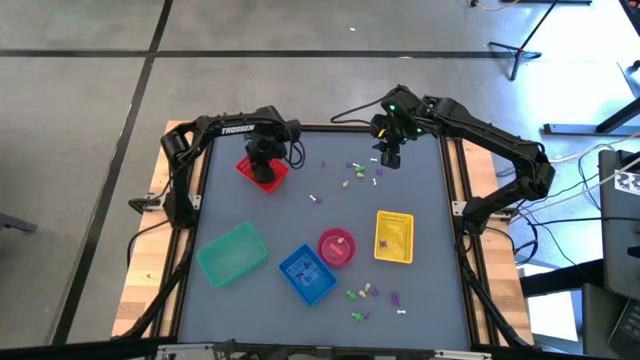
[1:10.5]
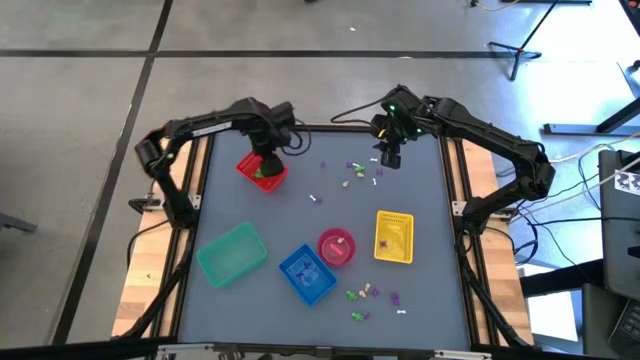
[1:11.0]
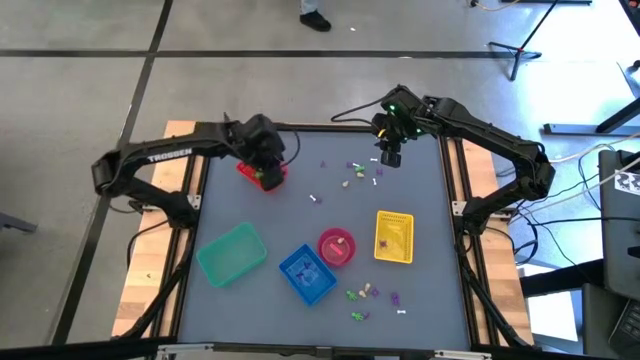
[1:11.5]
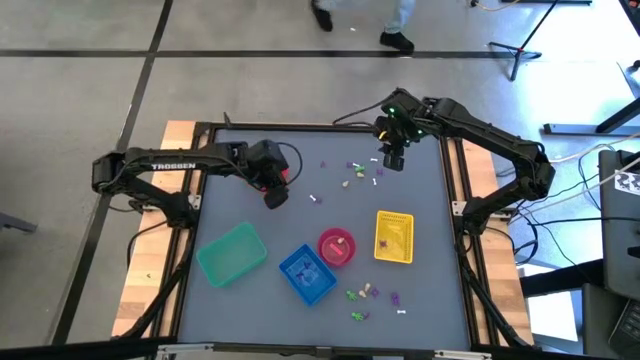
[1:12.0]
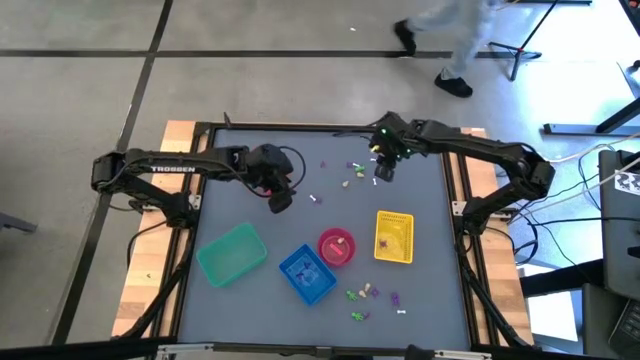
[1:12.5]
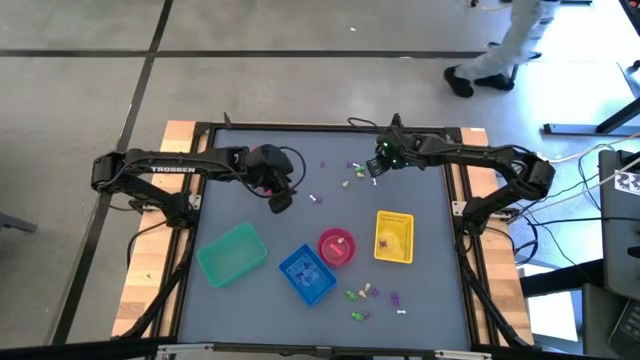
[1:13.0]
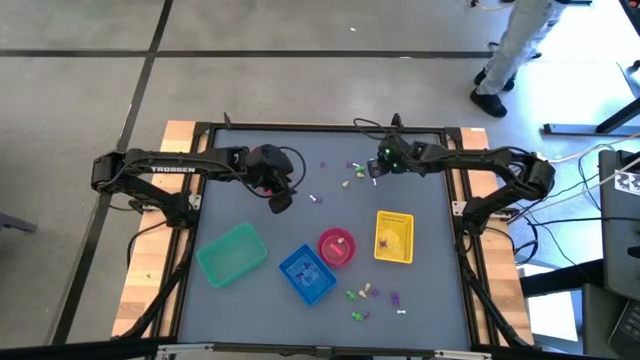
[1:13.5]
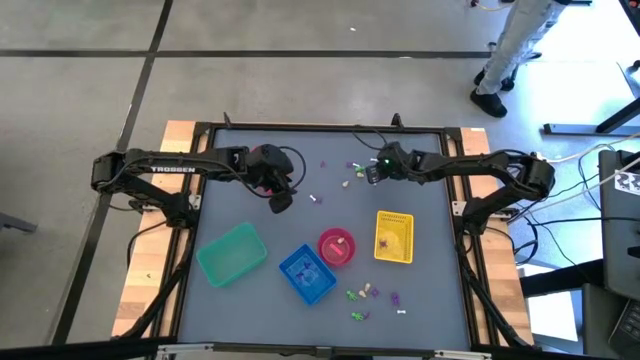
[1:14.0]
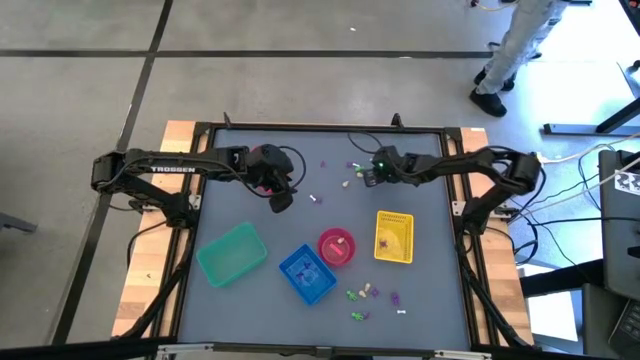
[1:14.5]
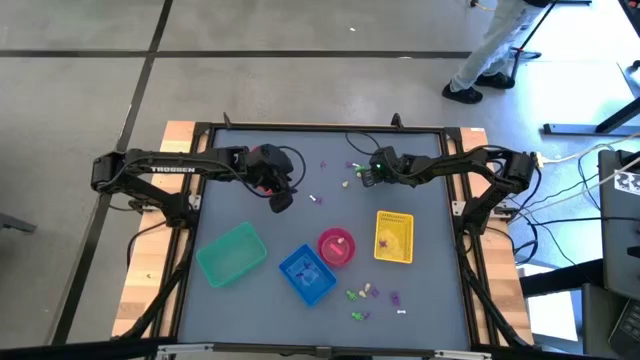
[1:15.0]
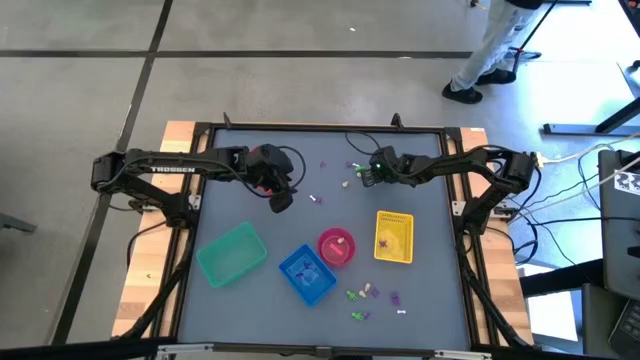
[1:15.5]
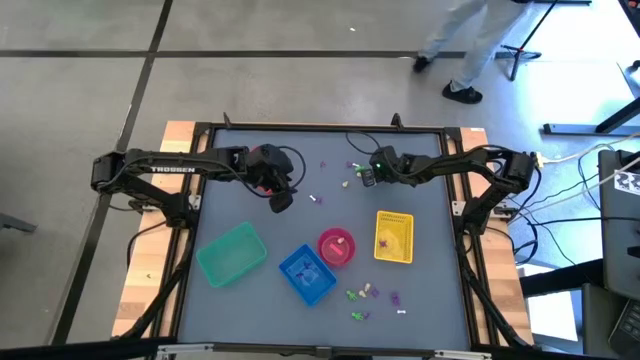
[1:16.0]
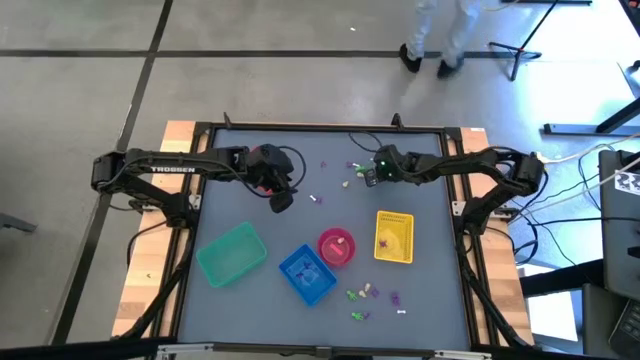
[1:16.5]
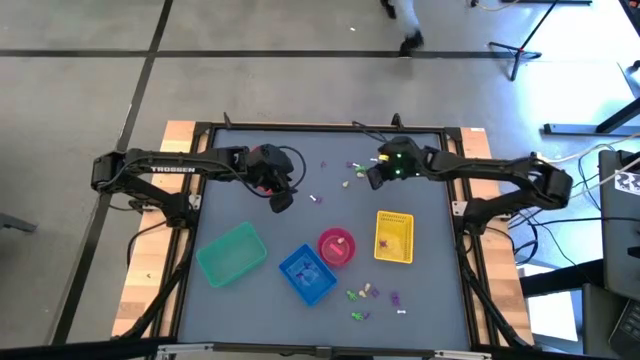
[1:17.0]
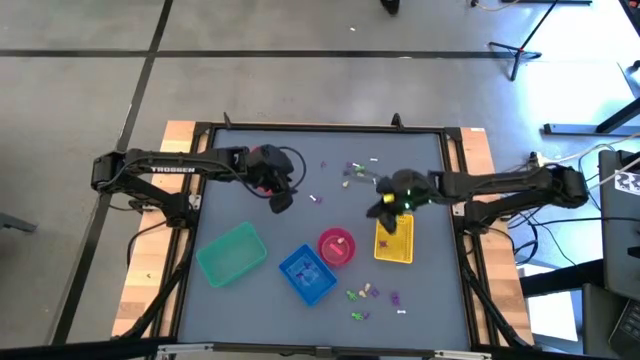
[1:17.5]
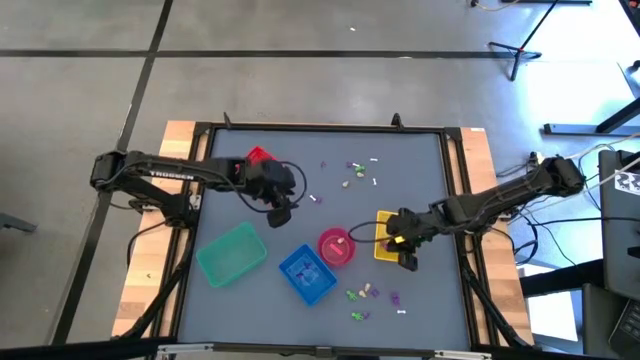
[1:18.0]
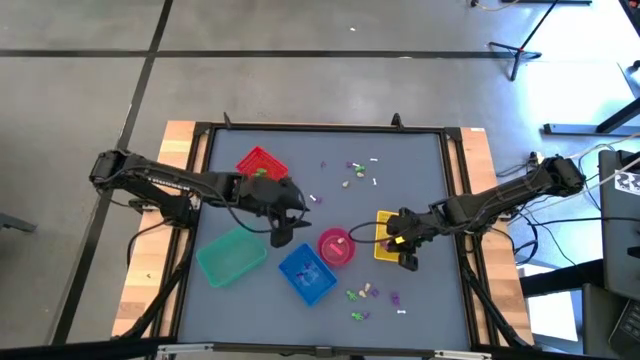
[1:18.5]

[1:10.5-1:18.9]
Task: Sort Halloween decoration
Put the violet spider toy into the yellow bin

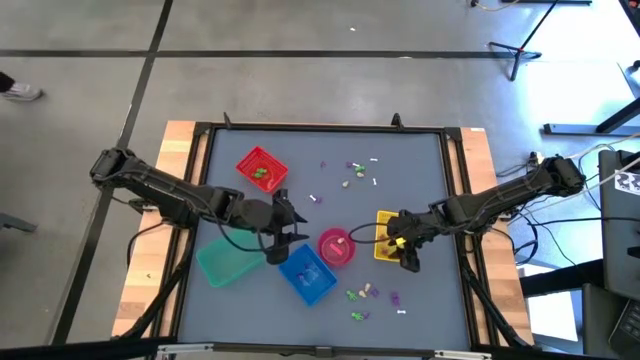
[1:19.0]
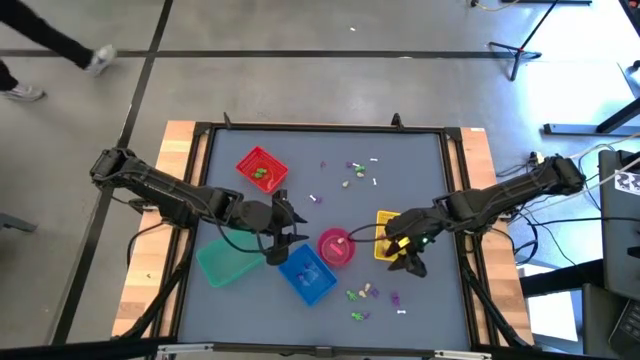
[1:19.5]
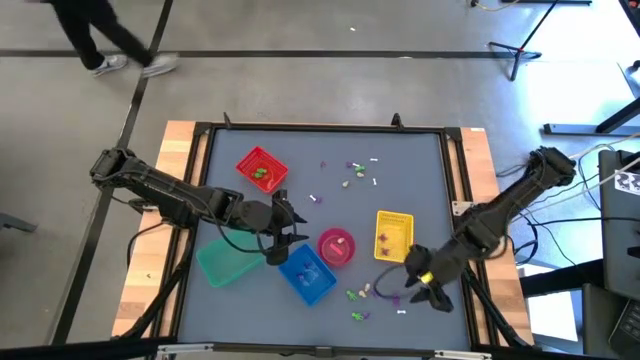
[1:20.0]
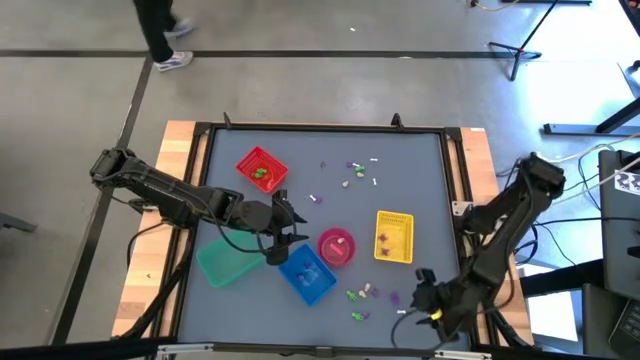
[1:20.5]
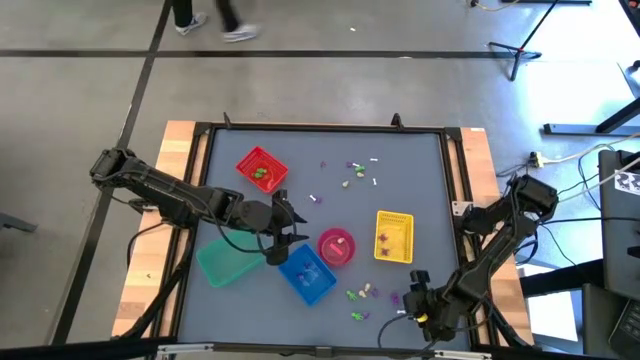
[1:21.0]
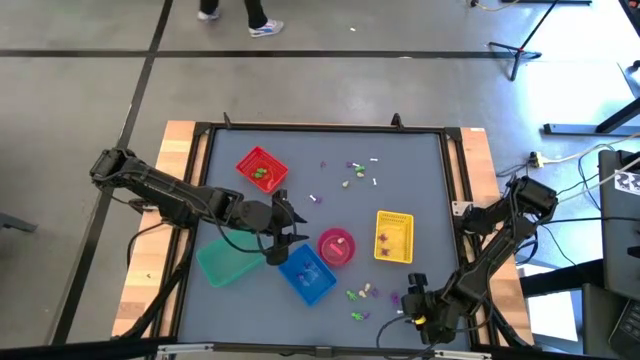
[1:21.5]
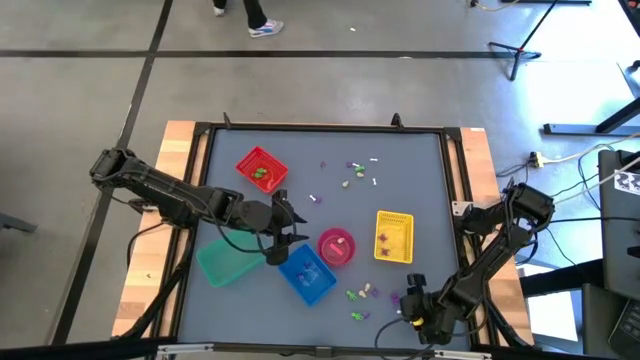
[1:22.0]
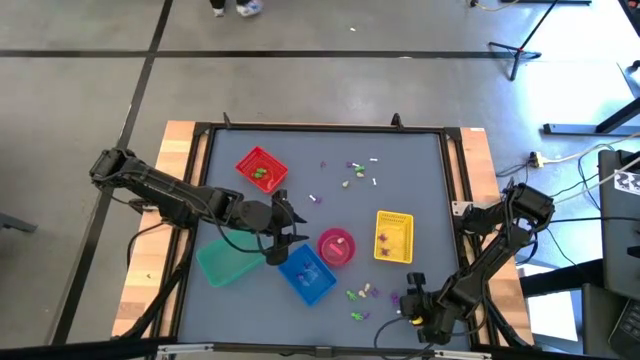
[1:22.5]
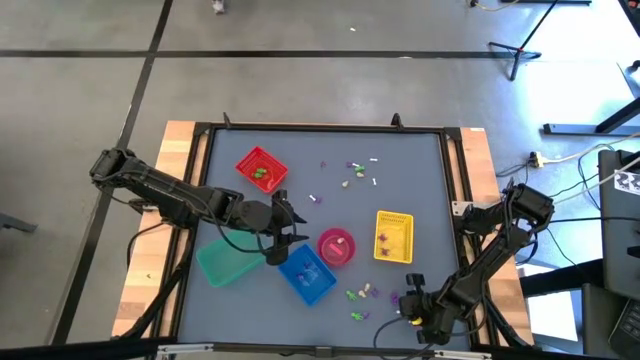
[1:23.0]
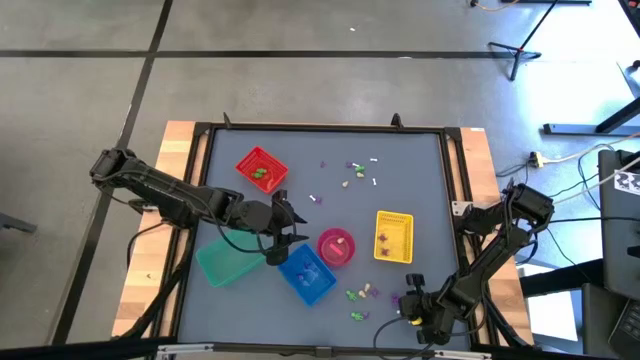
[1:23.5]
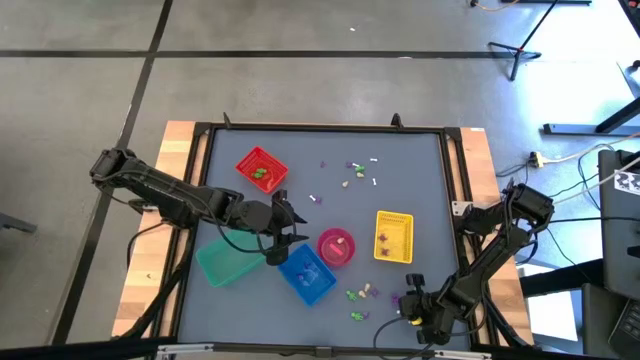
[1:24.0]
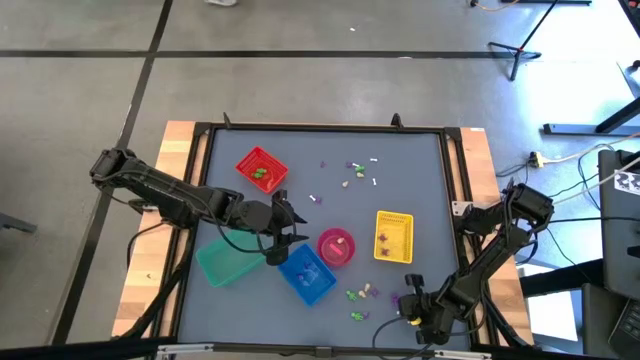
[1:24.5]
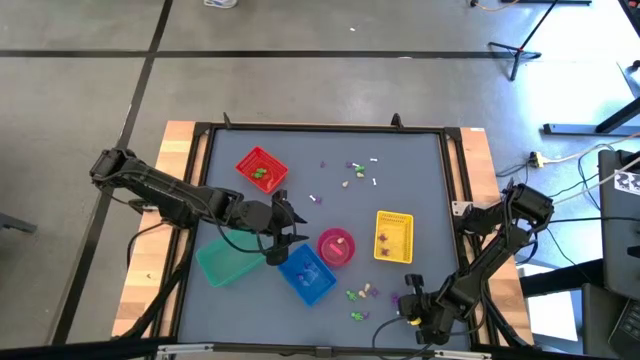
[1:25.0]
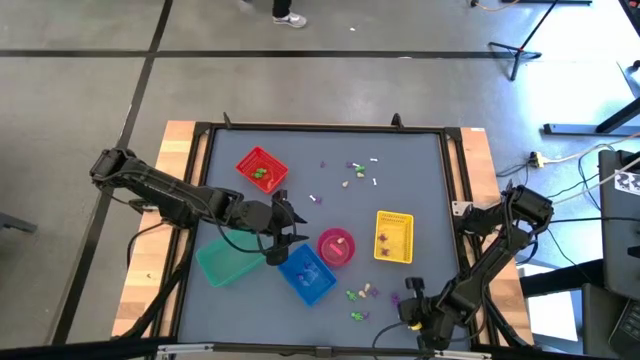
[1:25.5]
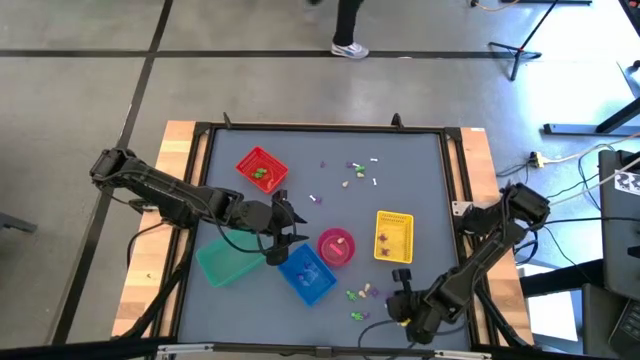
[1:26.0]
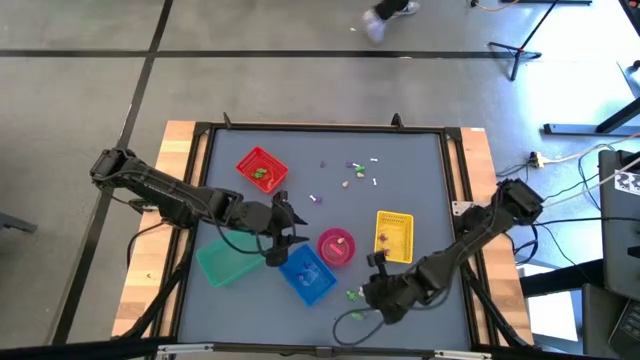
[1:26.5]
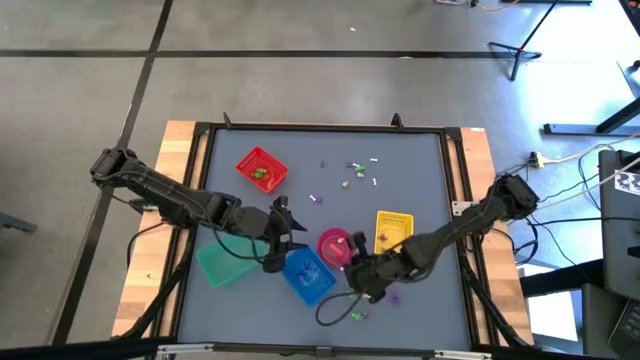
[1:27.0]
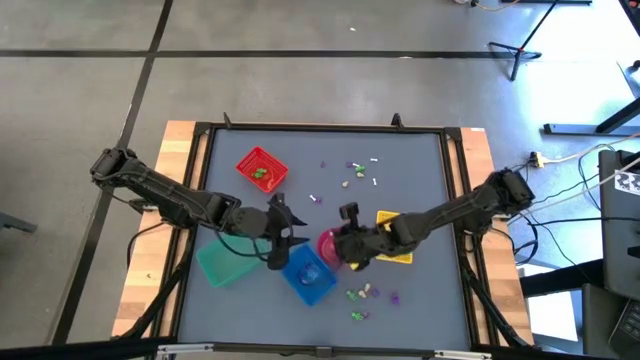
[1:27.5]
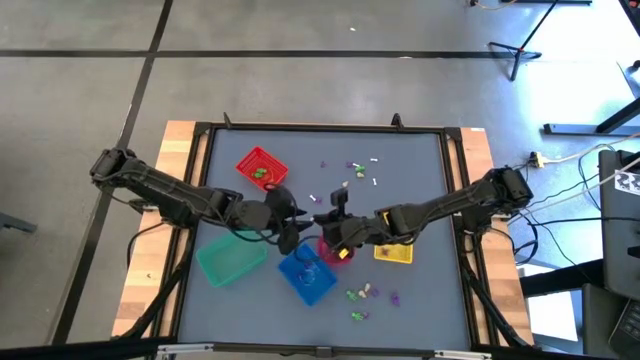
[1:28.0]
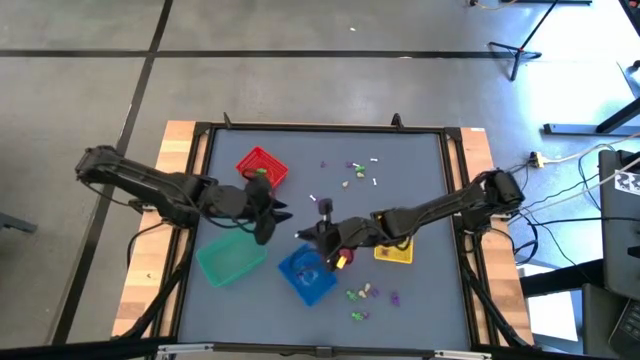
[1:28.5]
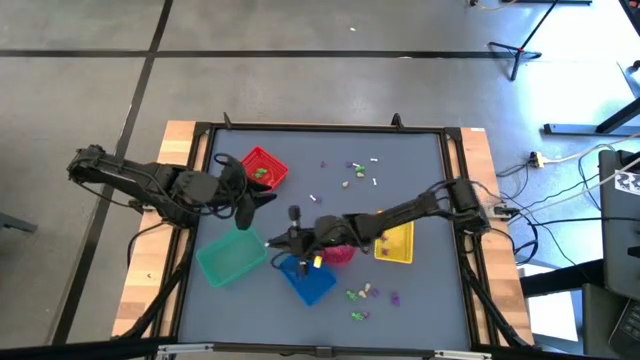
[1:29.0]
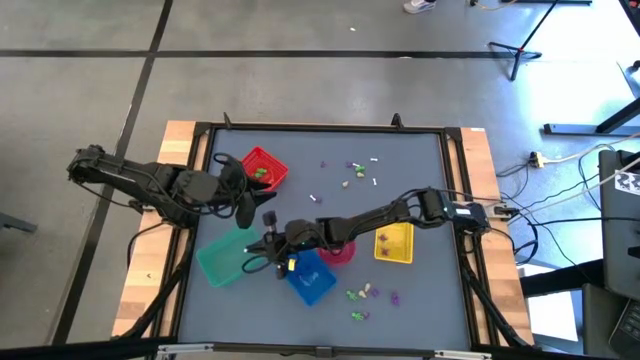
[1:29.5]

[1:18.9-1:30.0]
Put the white bone toy into the green bin

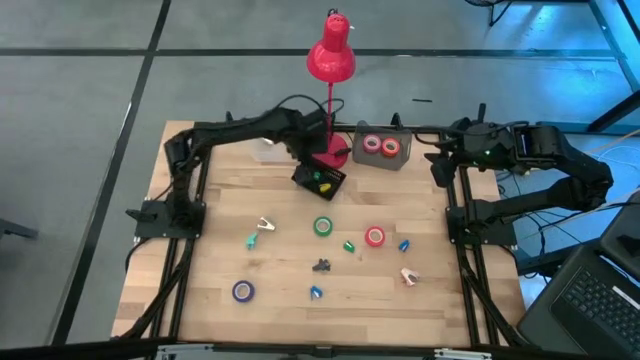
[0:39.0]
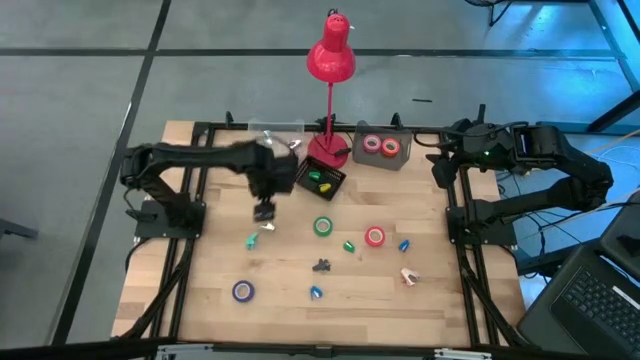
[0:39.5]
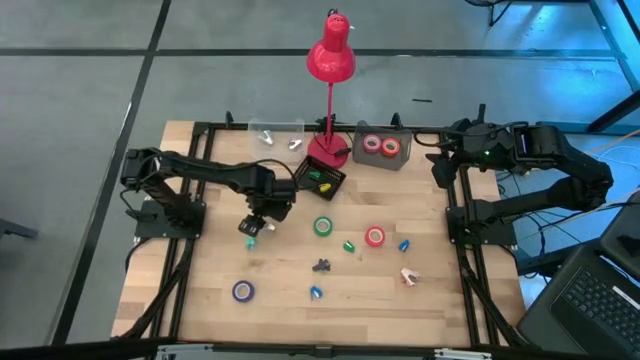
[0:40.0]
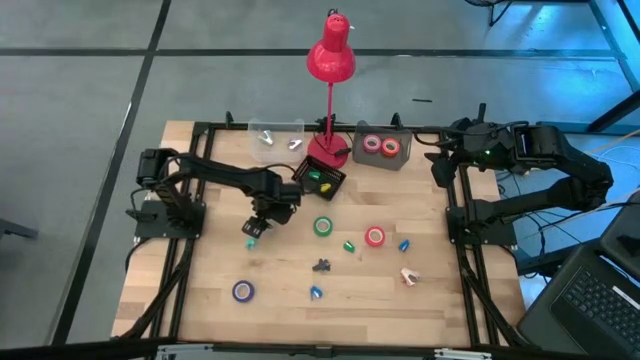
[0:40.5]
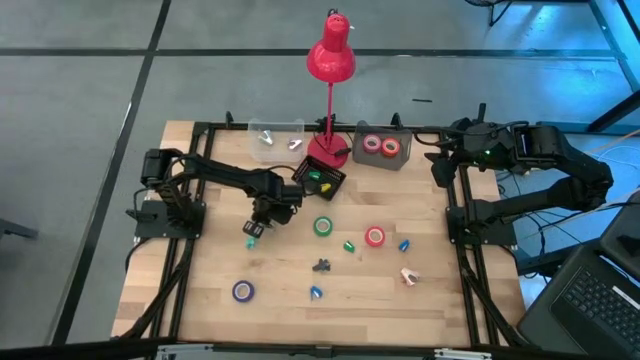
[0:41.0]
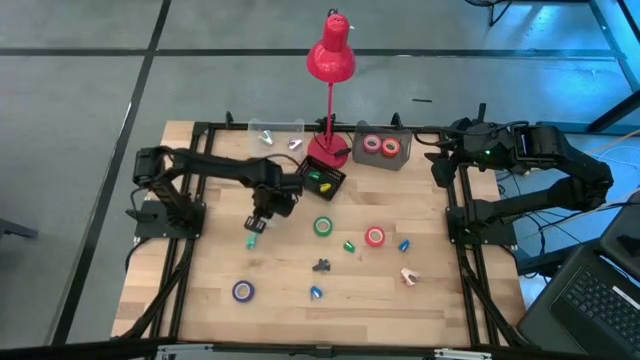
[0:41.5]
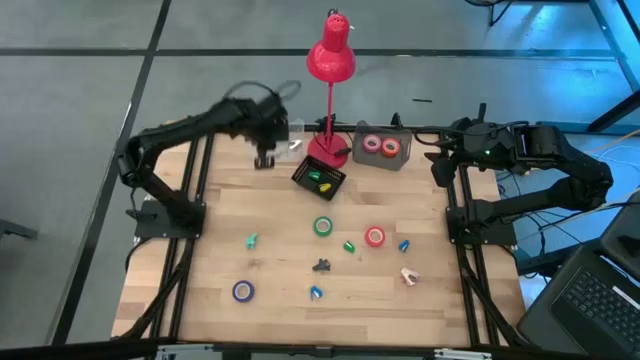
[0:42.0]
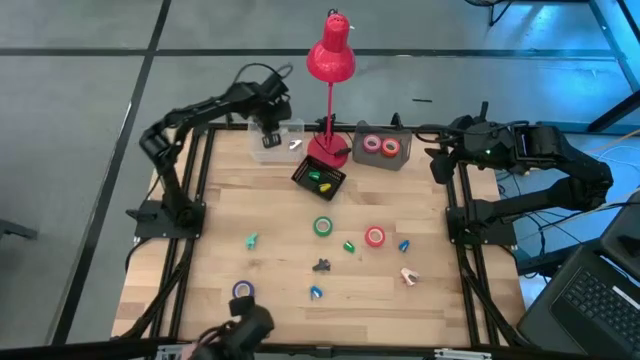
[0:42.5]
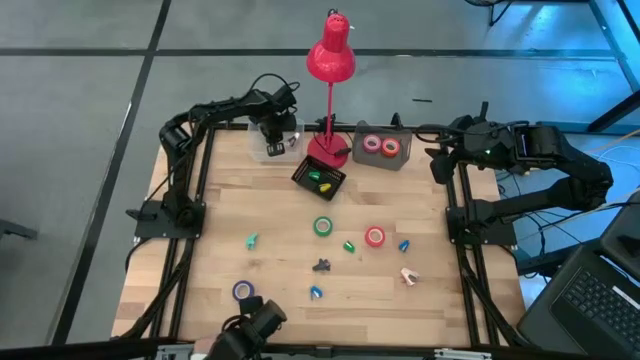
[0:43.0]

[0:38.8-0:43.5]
Task: Pick and place Stapler, Stapler remover, tape
Put the gray staple remover into the transparent bin
